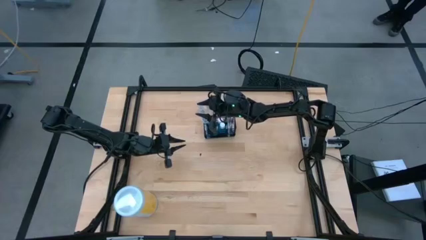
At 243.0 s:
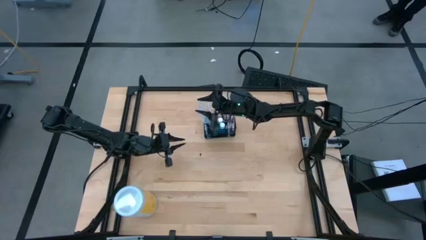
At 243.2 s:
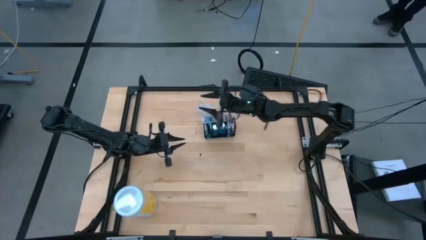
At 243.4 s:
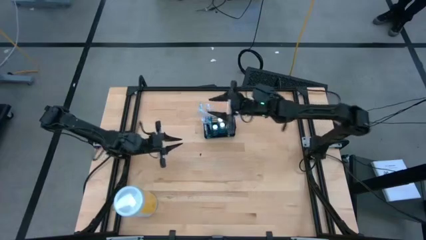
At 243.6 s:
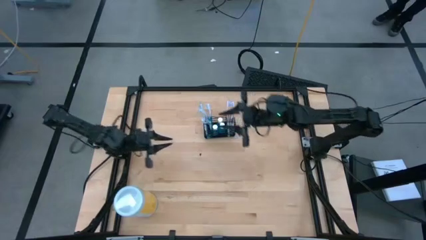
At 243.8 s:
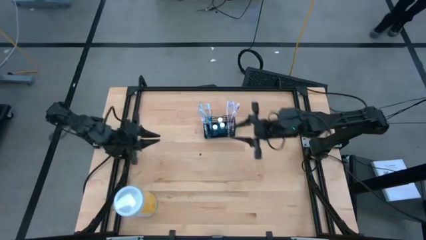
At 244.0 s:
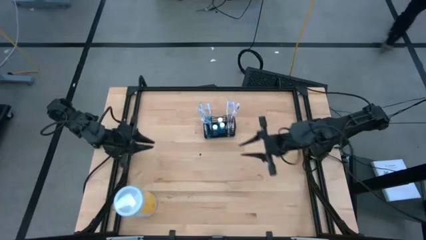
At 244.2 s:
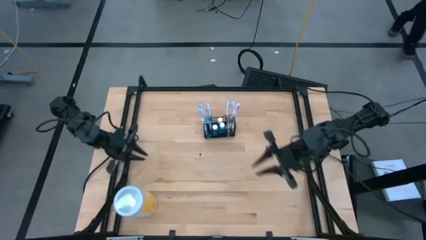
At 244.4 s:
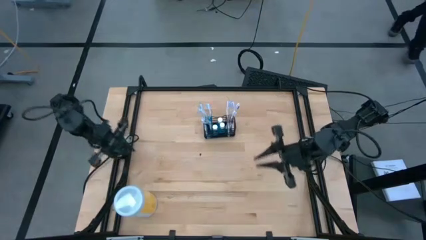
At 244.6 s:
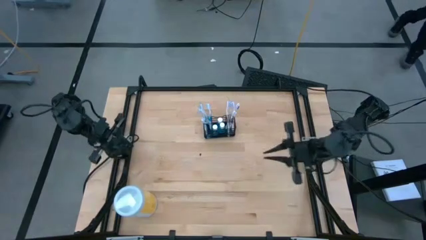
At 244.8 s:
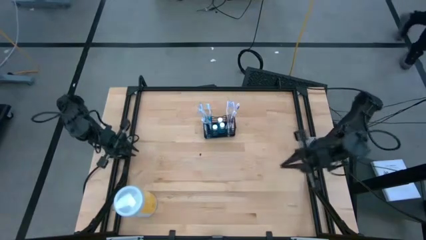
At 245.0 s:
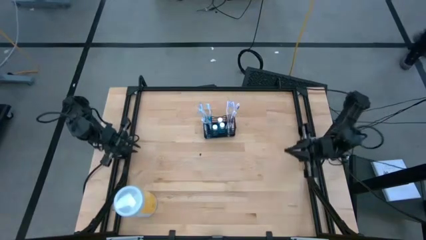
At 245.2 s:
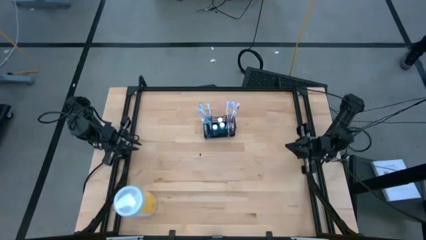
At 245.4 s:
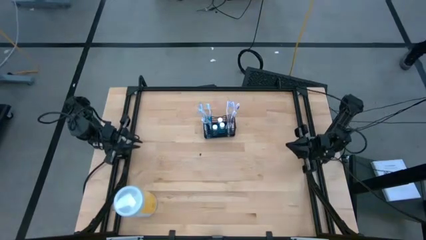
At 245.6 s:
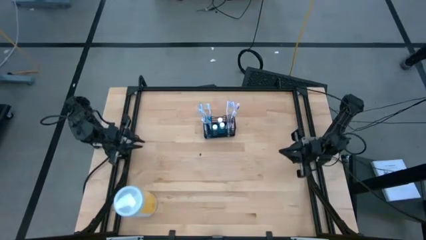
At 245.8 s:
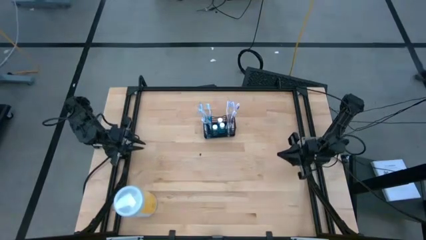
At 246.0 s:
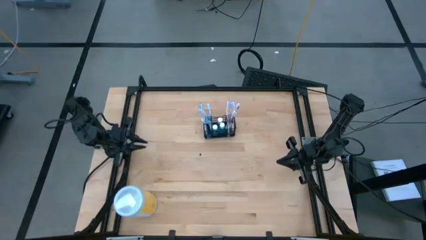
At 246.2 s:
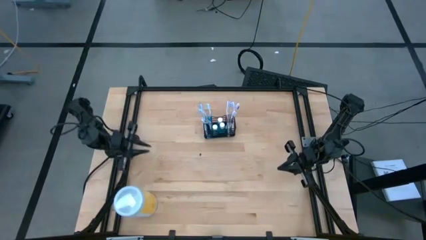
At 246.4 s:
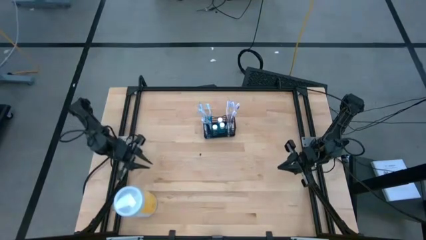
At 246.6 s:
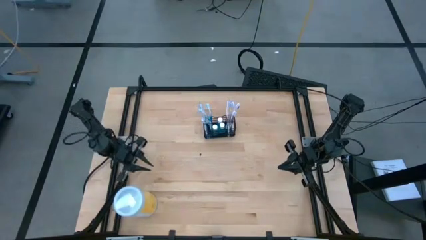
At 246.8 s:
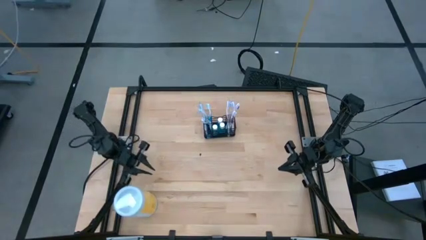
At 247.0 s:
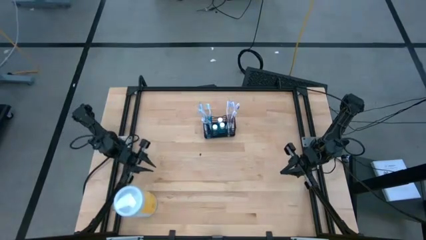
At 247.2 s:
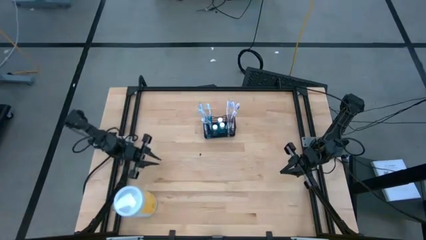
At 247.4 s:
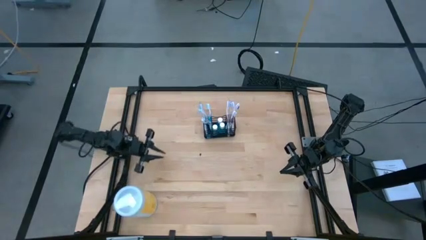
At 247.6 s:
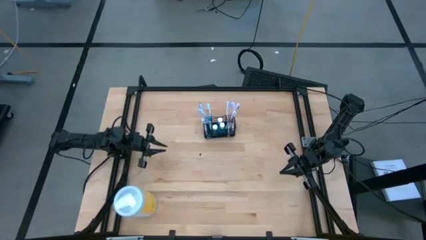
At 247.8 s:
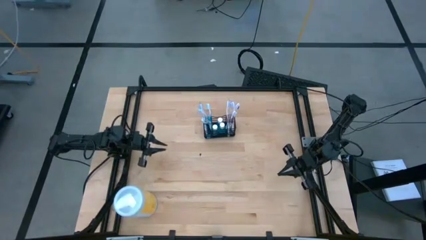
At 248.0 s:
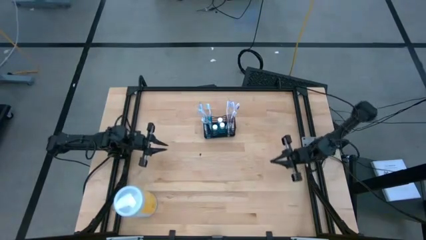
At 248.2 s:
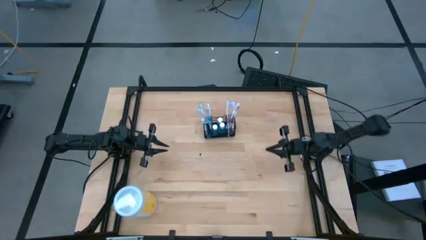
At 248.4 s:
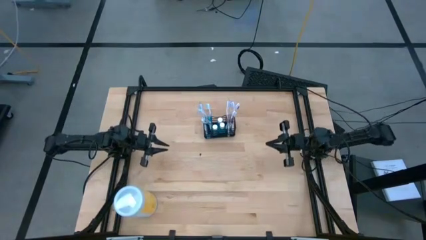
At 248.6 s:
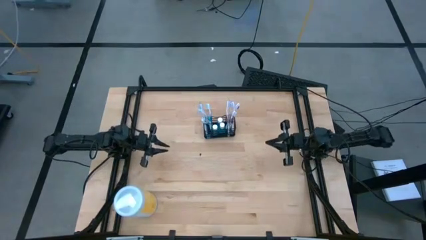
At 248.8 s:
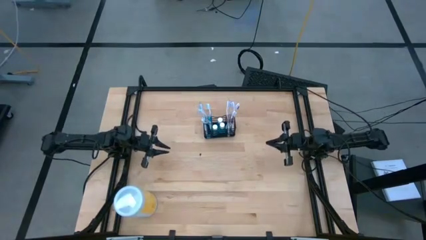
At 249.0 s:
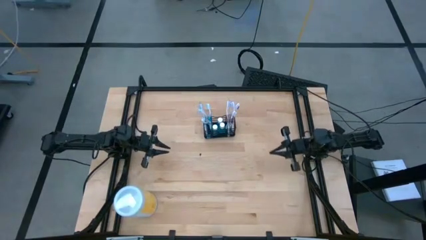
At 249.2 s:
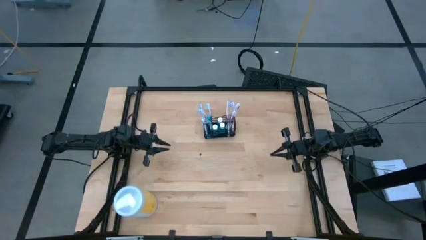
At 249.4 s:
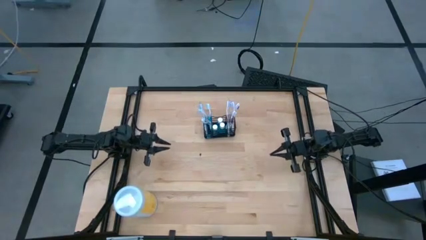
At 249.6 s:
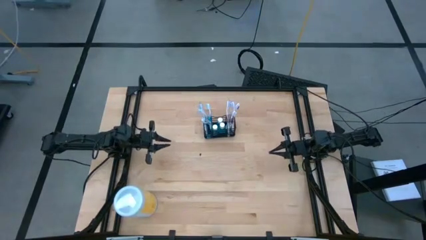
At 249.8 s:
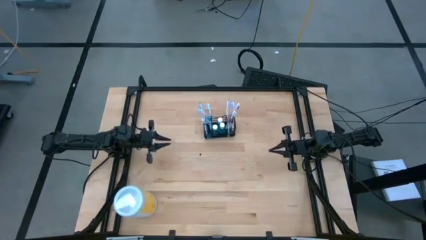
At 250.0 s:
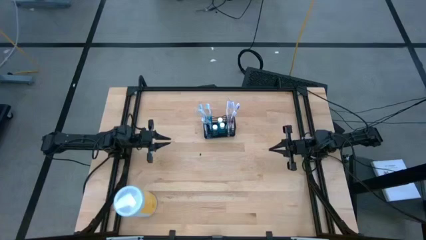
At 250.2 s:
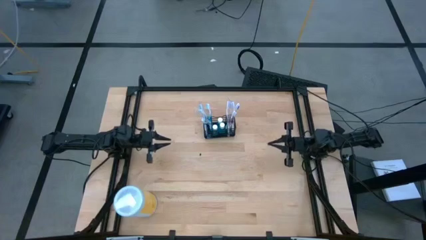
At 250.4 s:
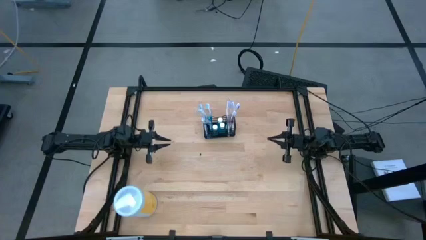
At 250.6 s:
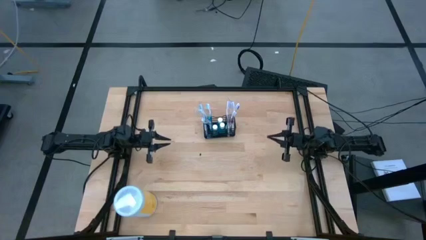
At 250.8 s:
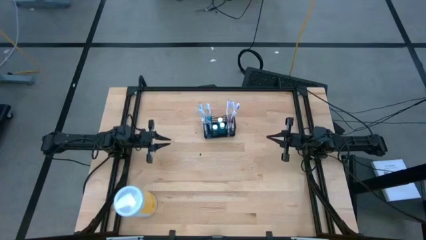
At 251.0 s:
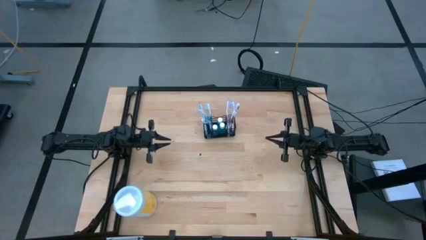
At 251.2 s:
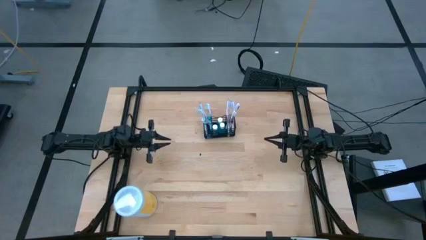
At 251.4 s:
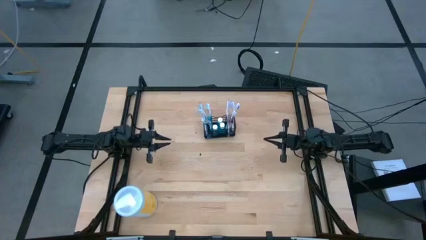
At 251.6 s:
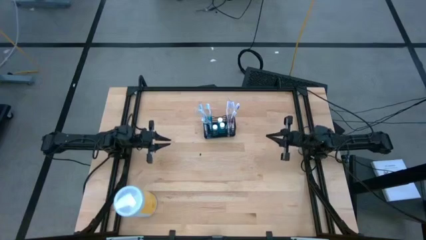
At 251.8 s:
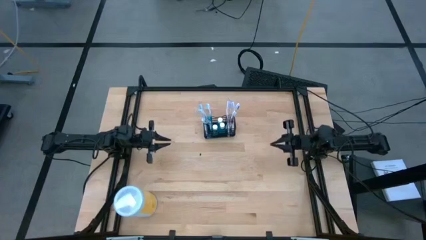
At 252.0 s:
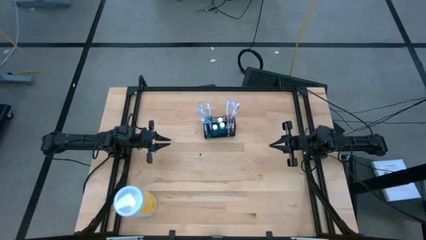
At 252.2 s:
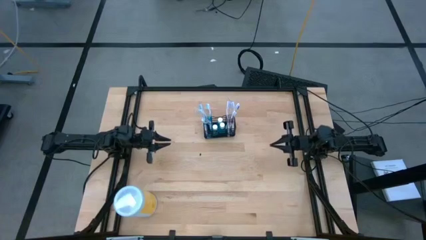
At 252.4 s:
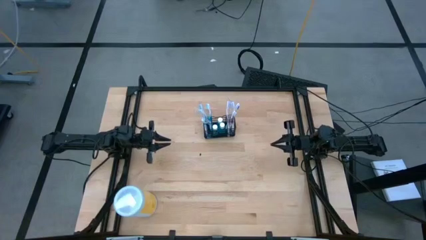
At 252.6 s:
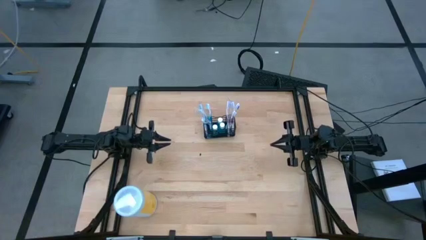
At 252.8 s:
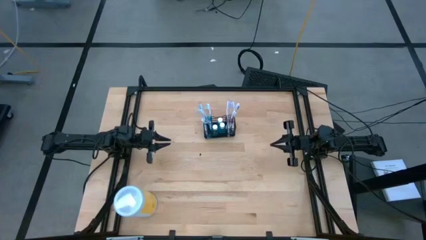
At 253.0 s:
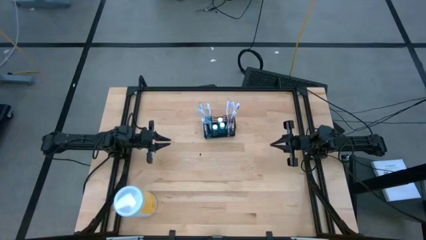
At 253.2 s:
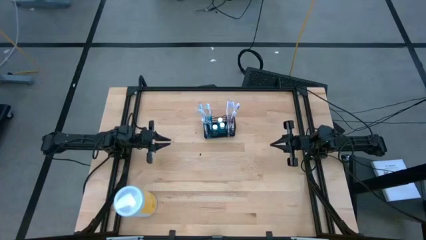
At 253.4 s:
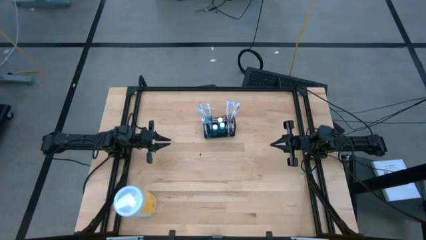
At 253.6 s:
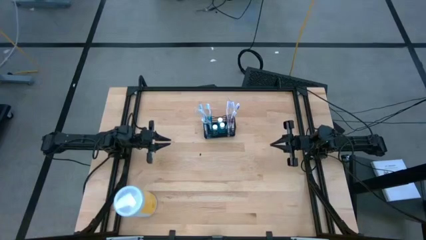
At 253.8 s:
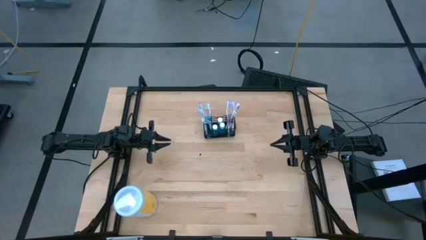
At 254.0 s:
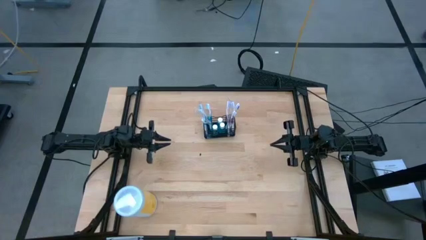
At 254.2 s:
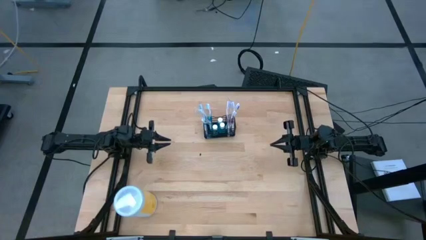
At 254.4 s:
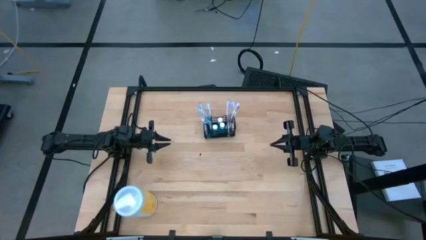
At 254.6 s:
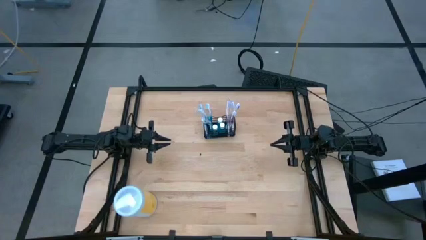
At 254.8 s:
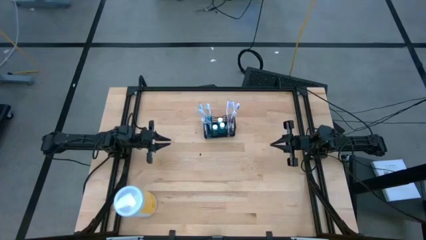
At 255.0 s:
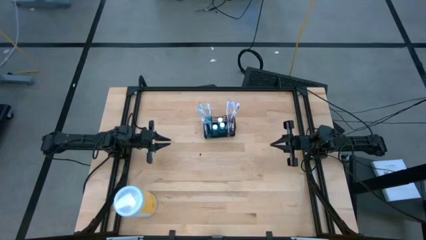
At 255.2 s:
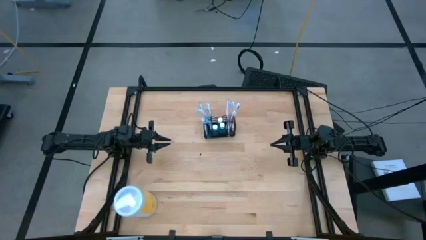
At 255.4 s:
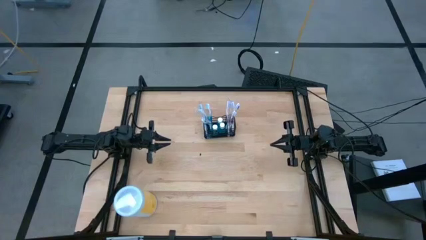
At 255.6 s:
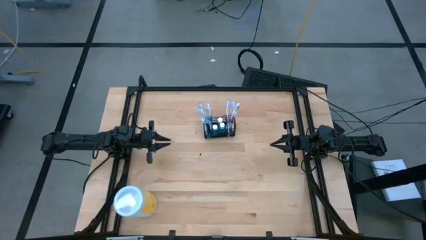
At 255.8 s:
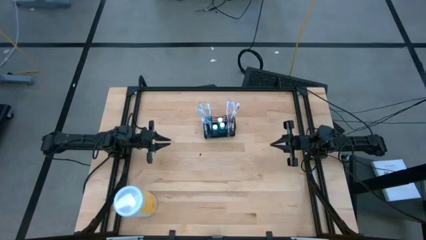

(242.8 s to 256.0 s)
Task: Pick & Place toothbrushing station
Return to Home Position
